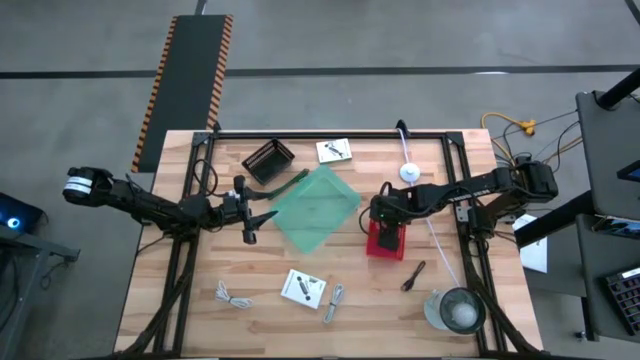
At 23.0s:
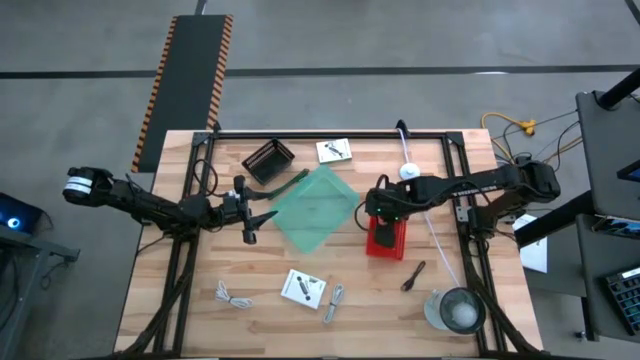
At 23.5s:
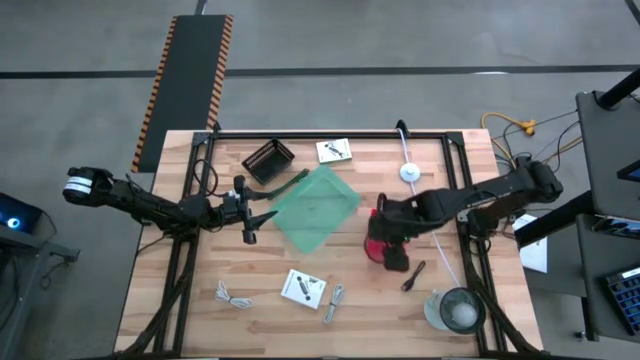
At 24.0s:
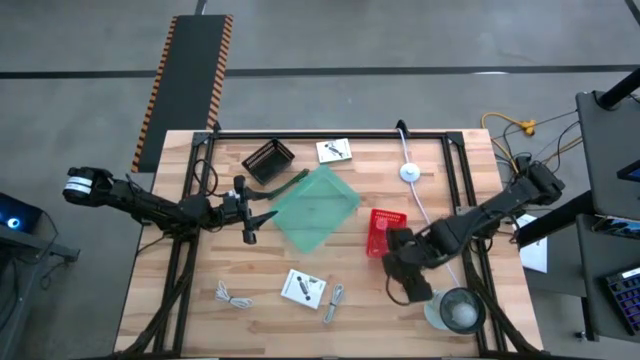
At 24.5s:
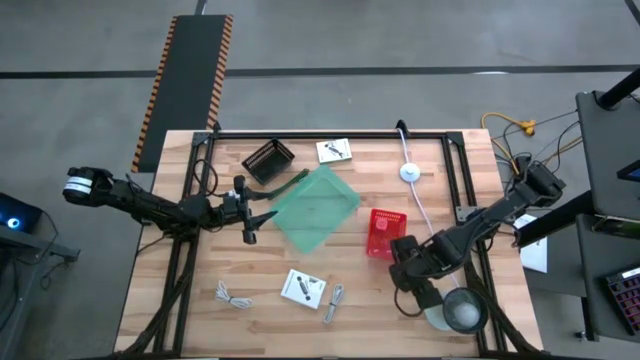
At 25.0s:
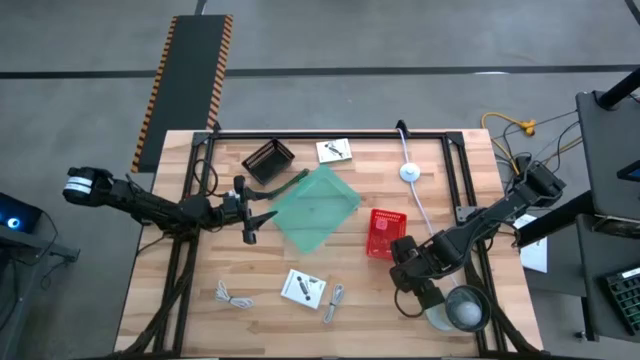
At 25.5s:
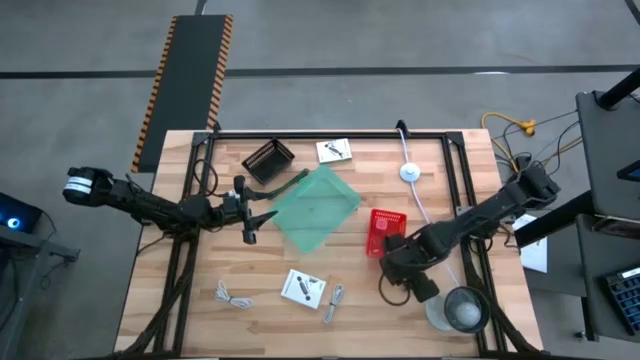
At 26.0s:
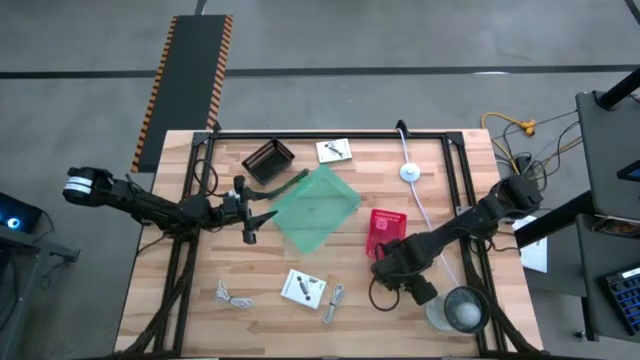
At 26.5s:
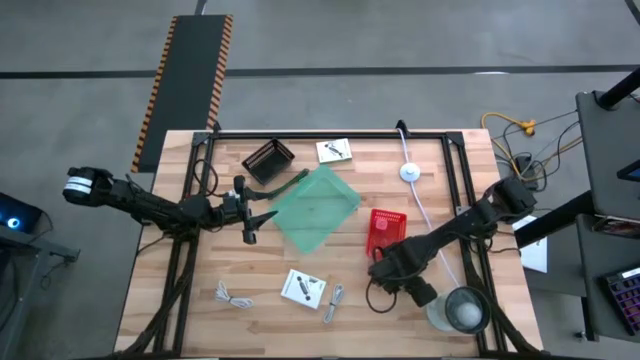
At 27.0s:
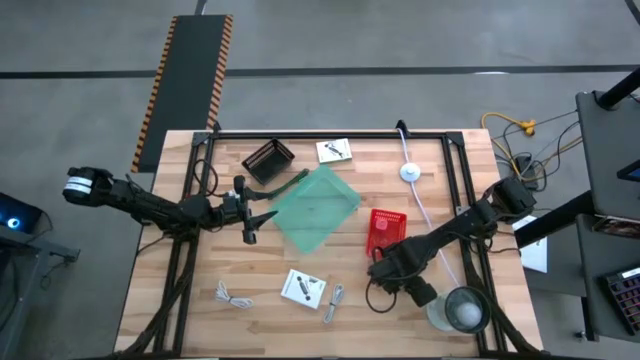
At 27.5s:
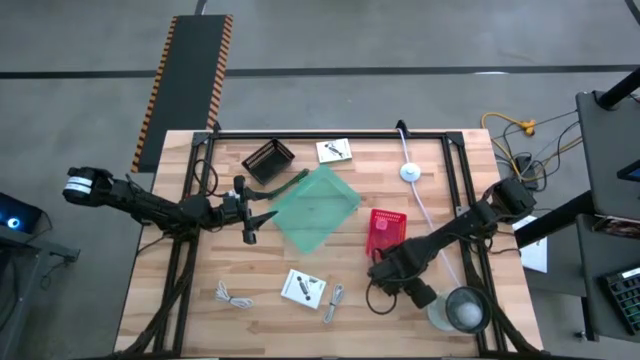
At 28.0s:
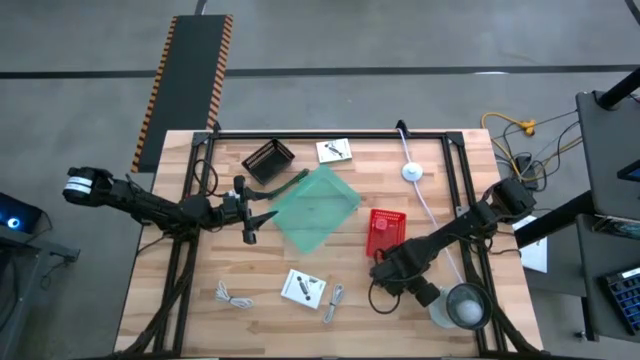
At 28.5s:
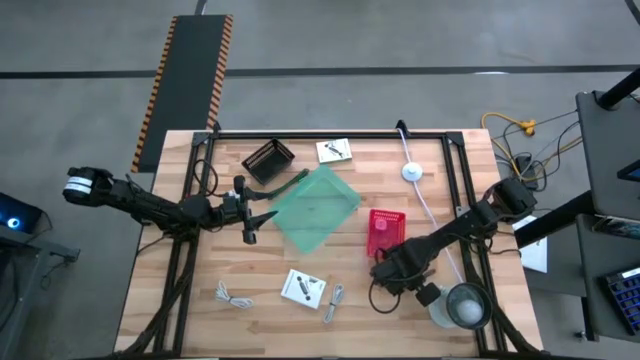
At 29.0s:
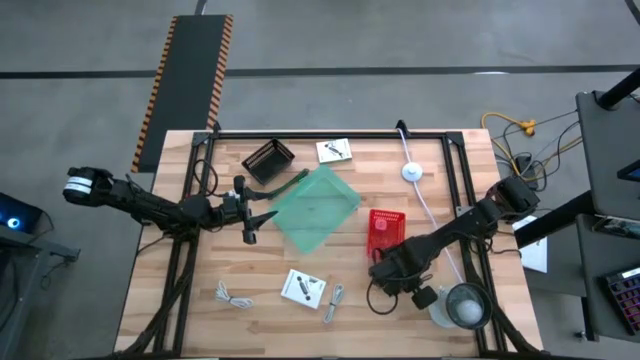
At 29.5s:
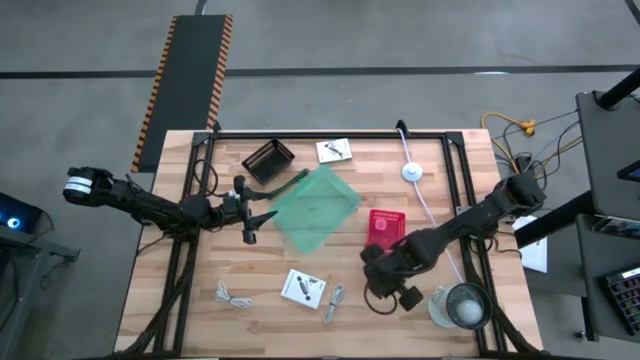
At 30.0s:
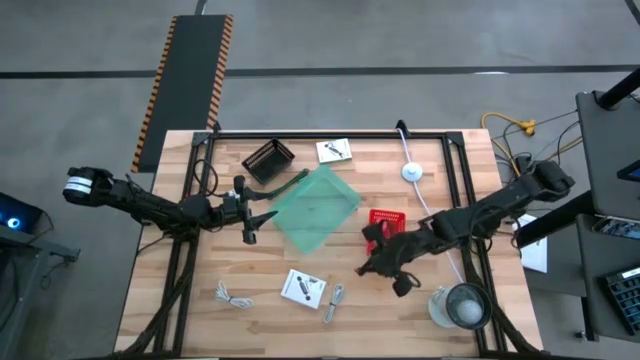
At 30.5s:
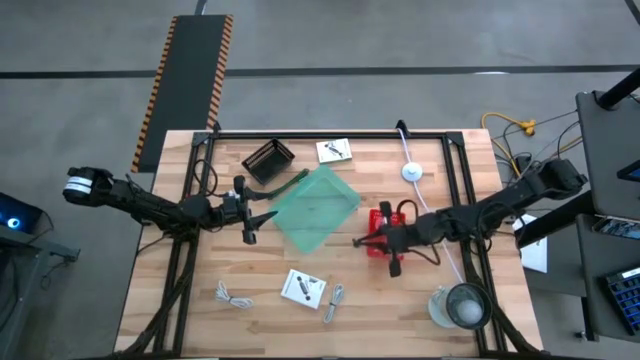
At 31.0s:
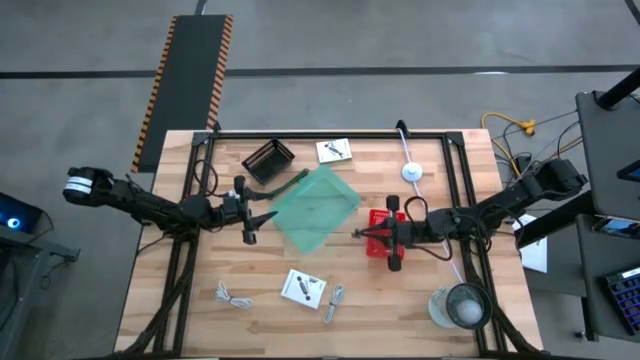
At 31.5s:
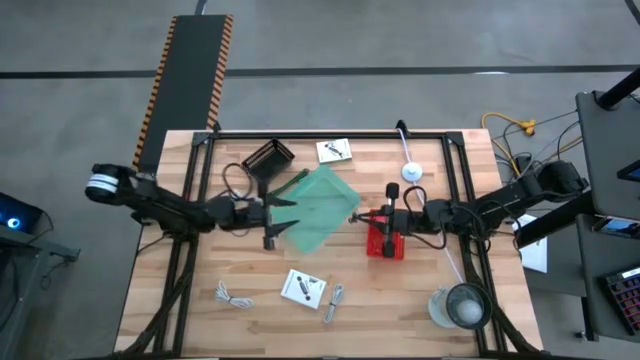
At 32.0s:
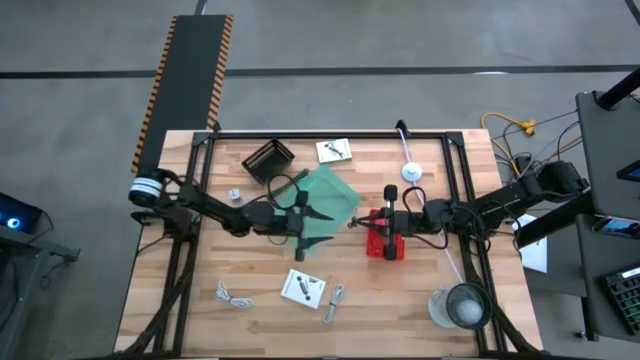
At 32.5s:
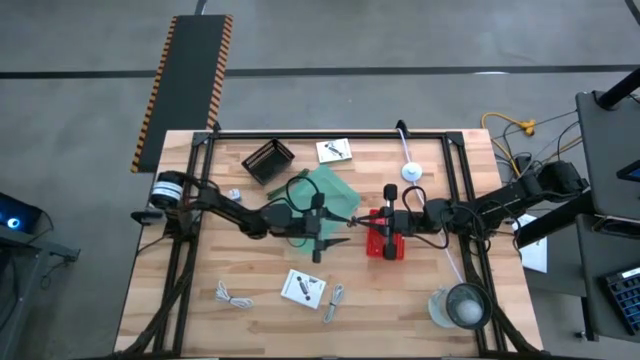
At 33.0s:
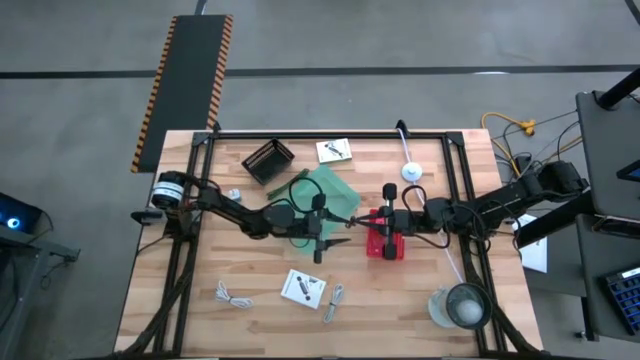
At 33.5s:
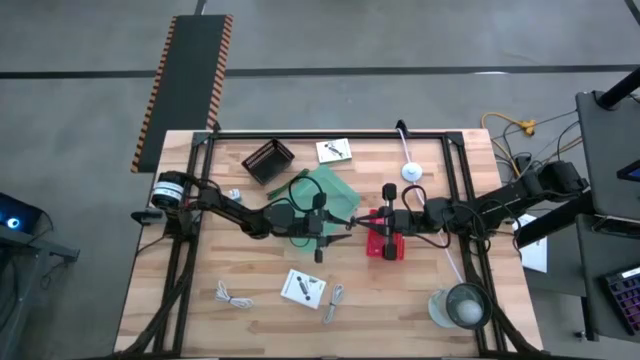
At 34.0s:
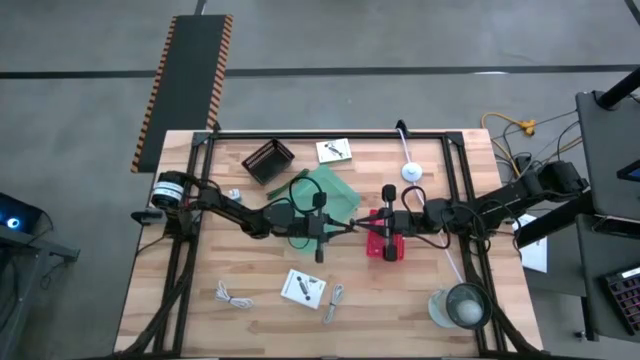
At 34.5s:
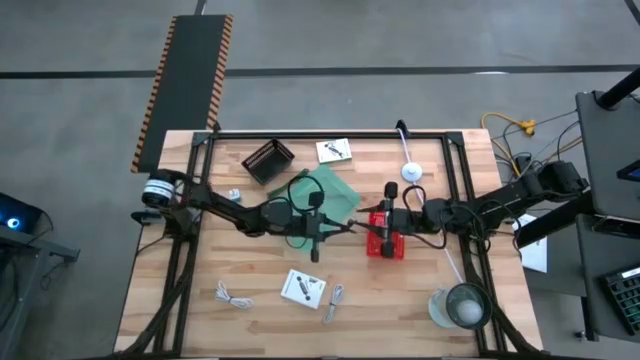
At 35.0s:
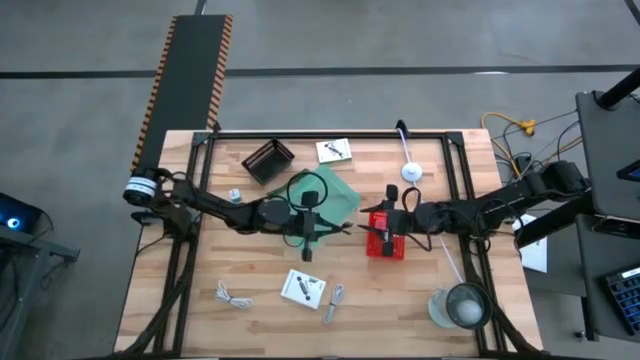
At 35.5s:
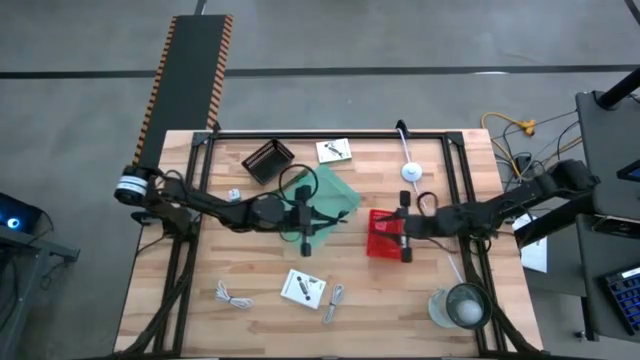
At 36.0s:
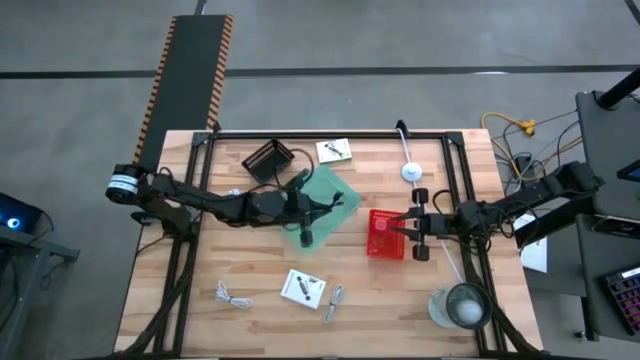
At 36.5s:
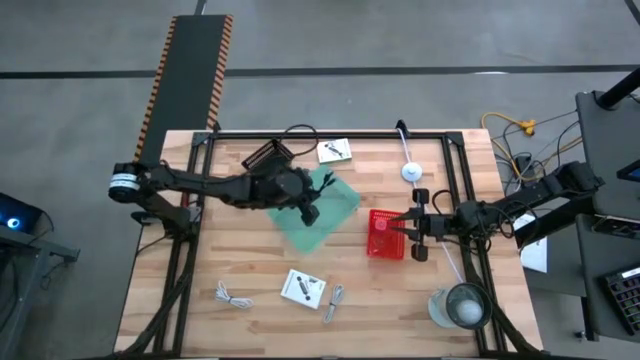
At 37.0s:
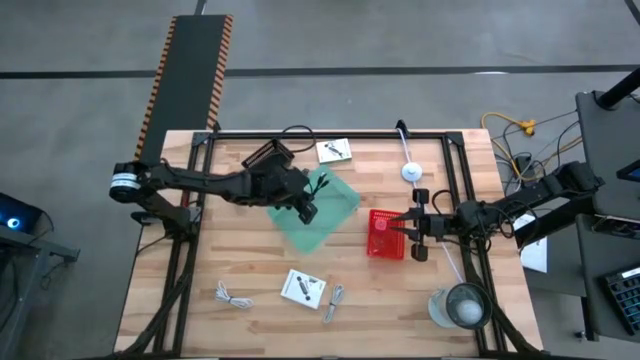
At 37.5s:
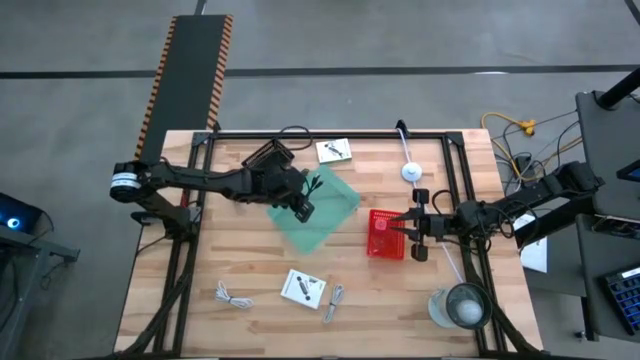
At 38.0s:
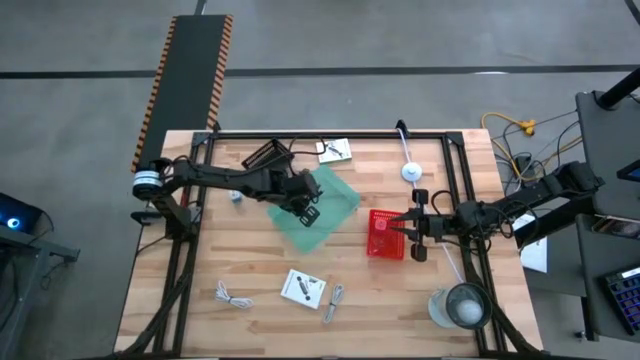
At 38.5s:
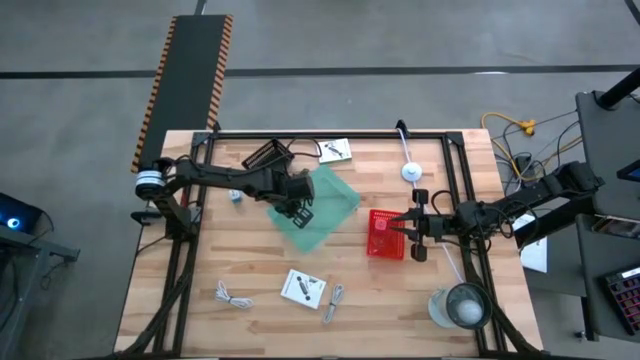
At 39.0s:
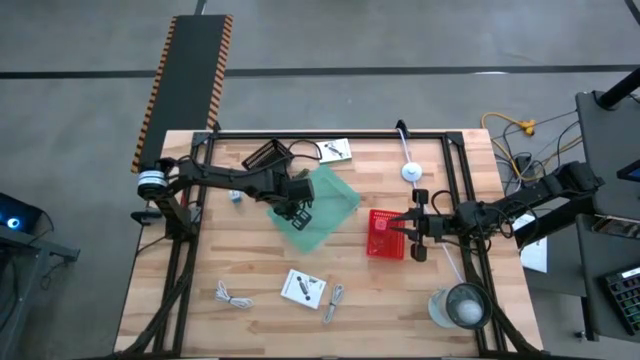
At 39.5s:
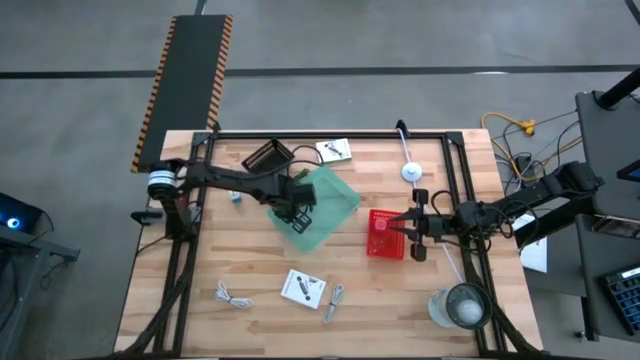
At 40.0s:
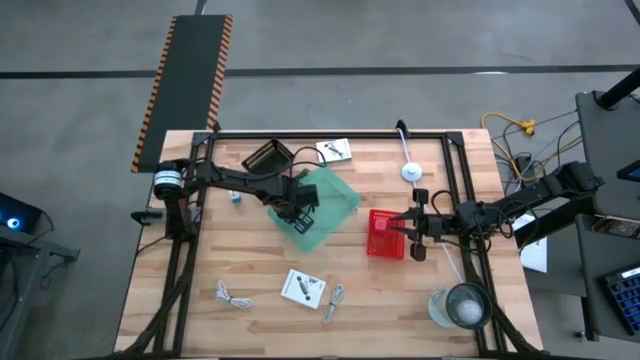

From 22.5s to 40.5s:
Task: Pick and place items into bin
Put the black charger cable into the green bin

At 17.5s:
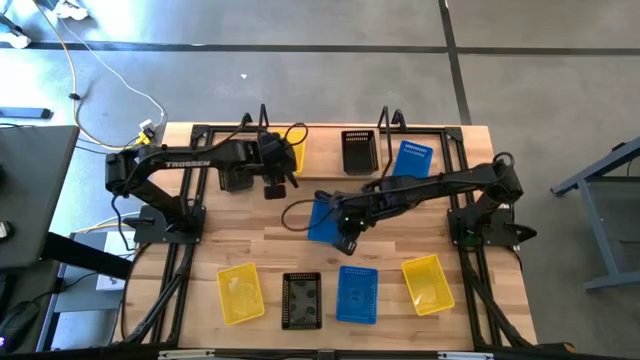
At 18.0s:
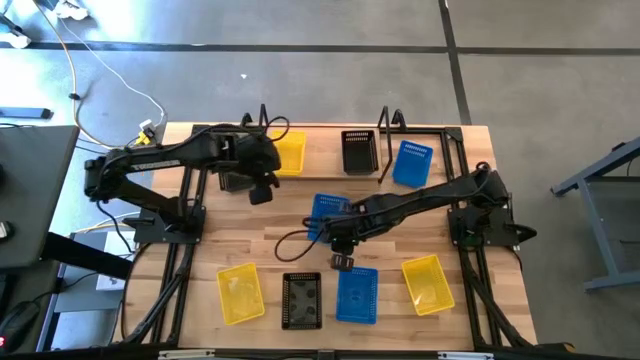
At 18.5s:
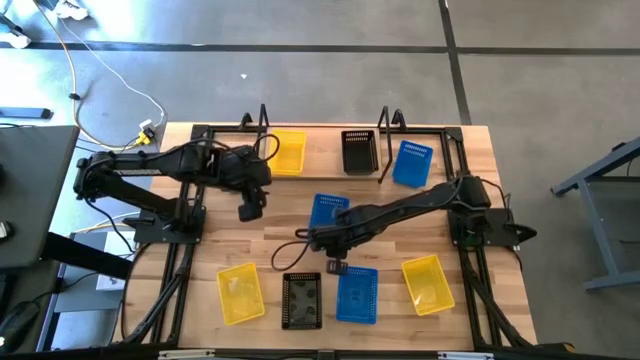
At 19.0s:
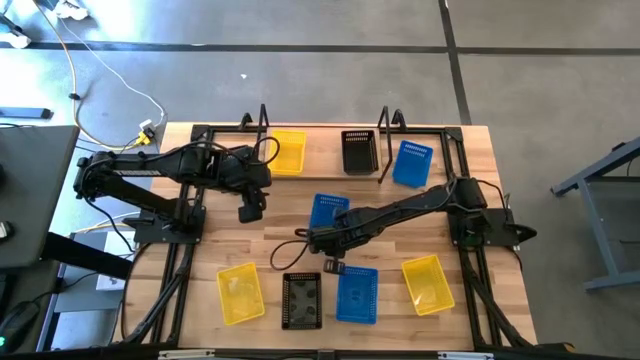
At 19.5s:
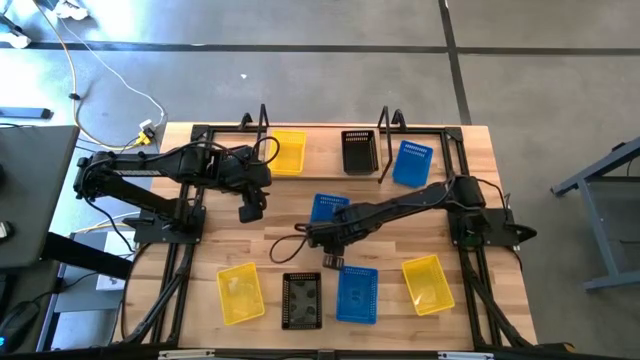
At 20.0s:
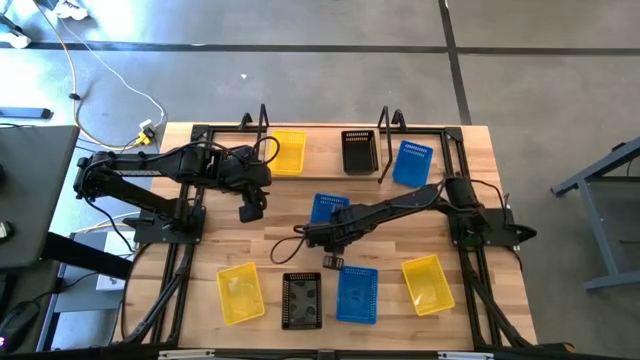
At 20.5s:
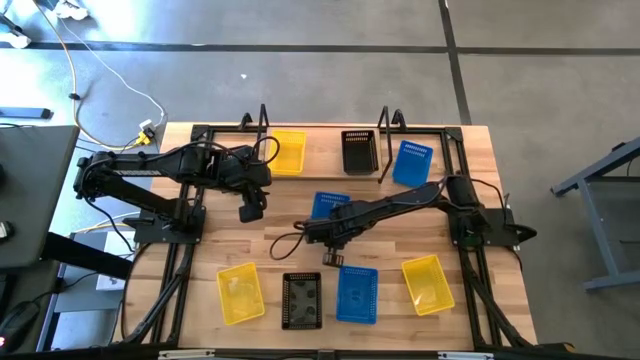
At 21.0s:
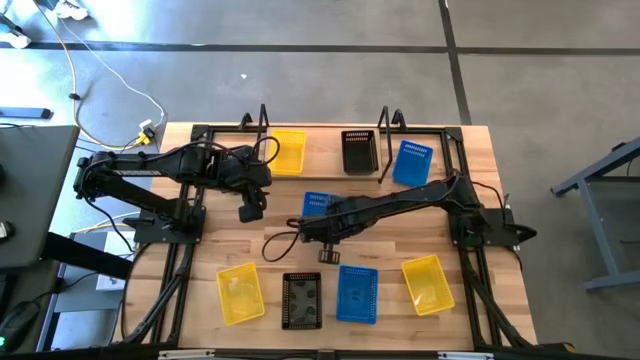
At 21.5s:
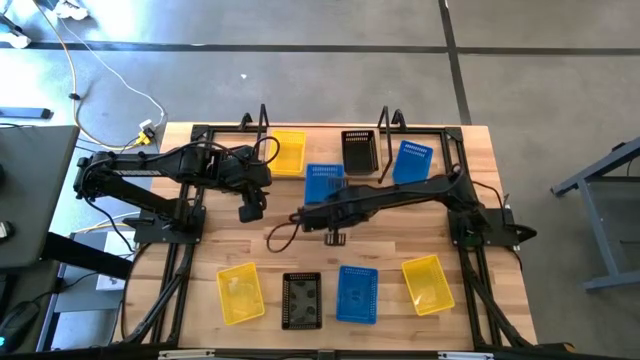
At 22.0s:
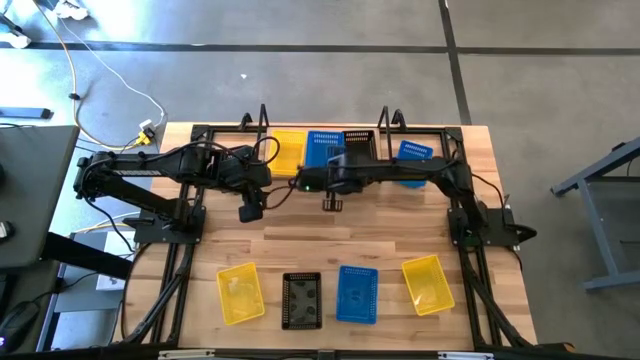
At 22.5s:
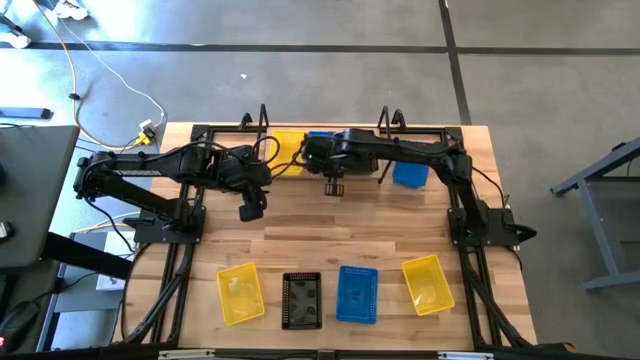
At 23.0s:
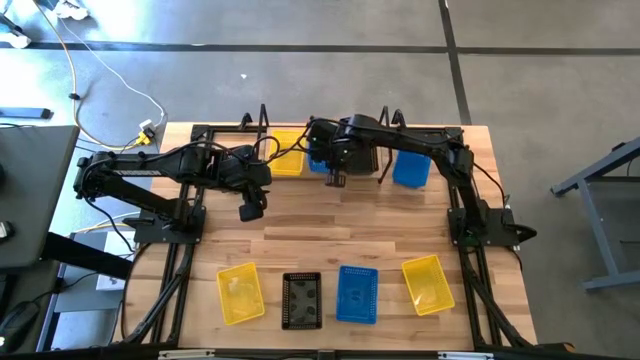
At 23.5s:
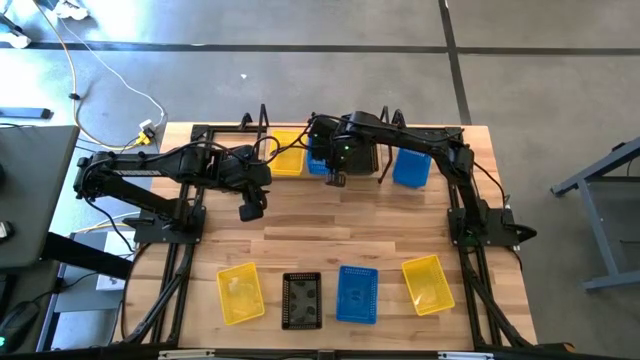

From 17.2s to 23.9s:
Task: Stack baskets on shelf by color
Put the middle blue basket on the shelf
